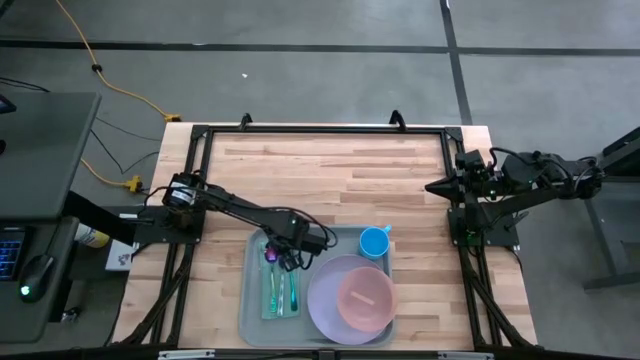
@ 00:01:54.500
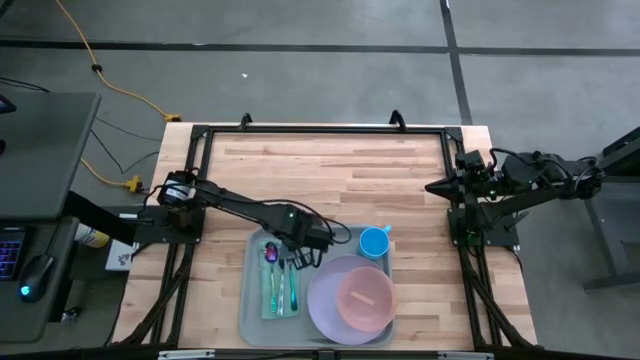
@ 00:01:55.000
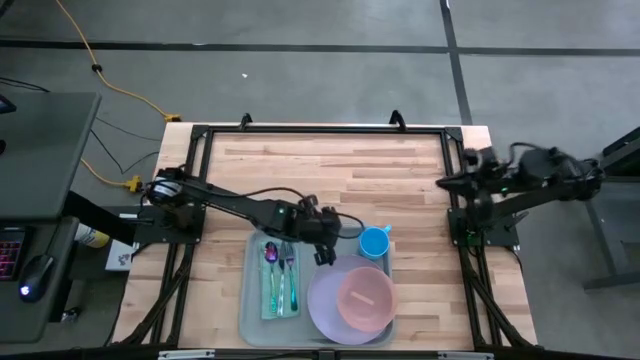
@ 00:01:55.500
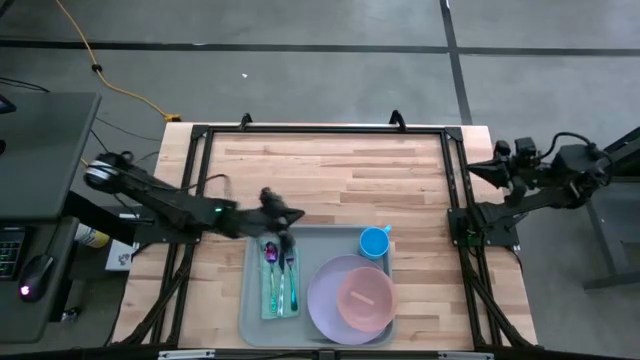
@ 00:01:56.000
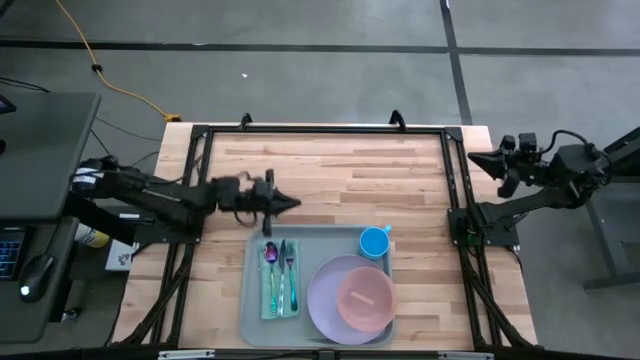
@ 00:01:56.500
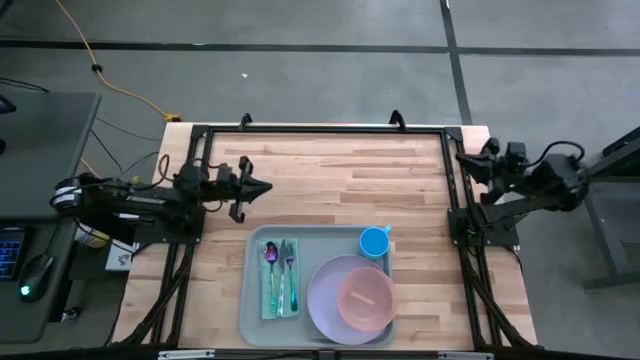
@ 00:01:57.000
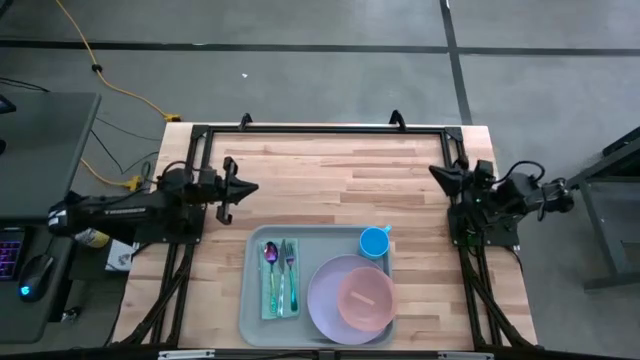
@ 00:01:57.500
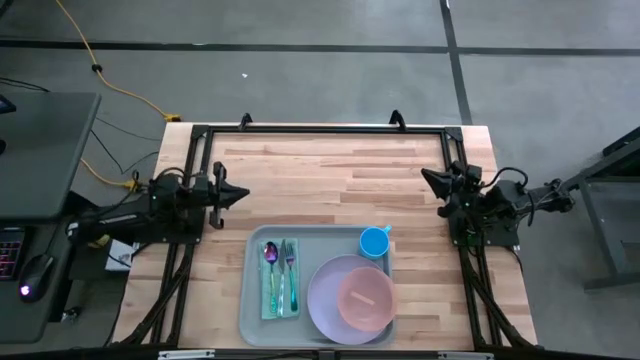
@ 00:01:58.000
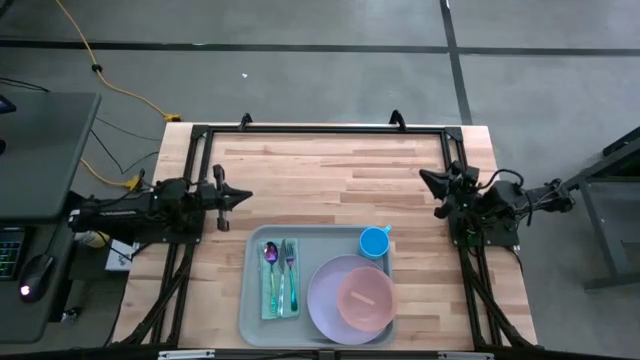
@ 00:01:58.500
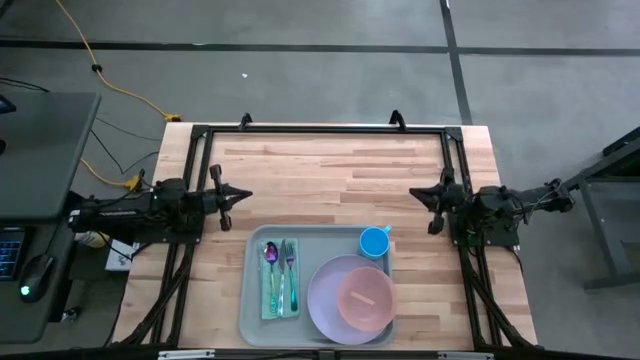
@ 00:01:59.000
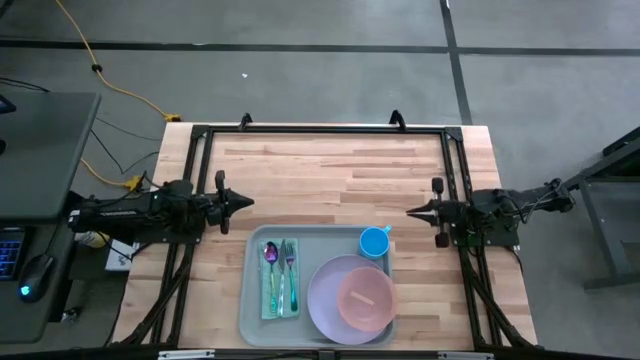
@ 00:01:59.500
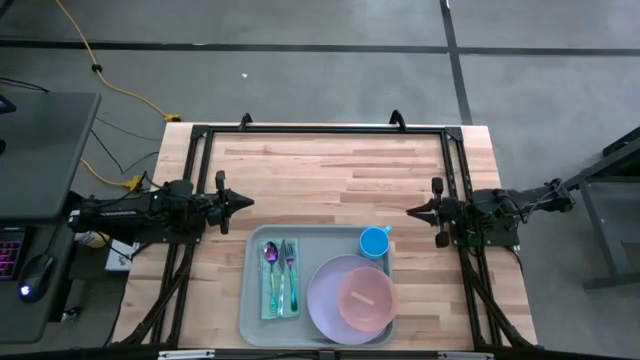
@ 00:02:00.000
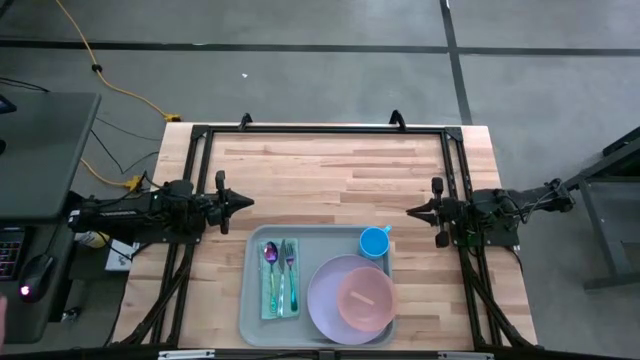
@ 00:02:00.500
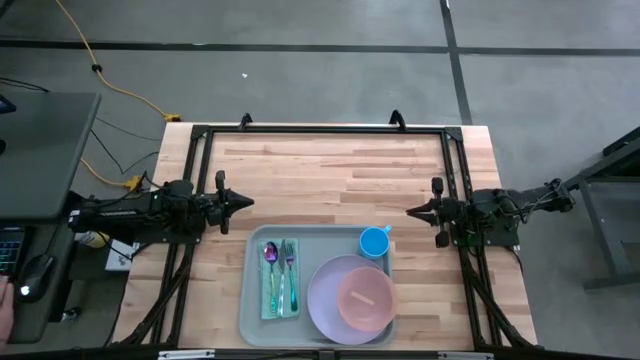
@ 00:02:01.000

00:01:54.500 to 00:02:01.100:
Task: Set up tray
Return to Home Position

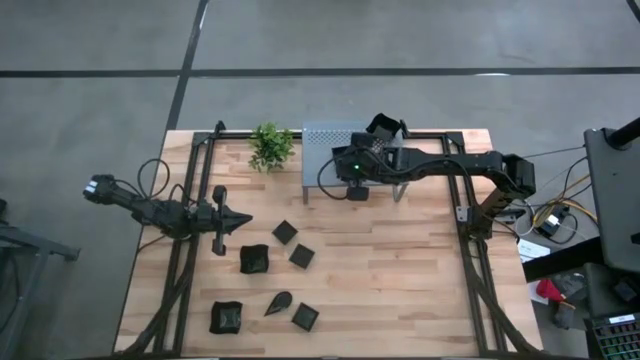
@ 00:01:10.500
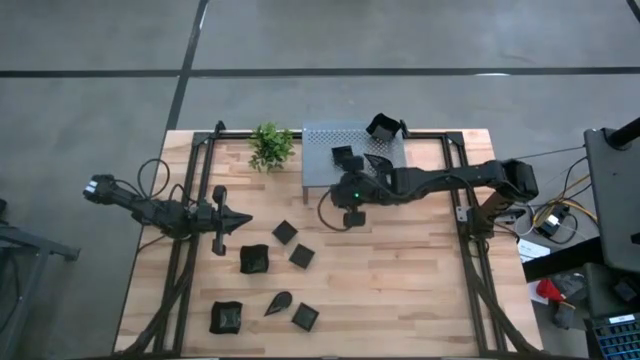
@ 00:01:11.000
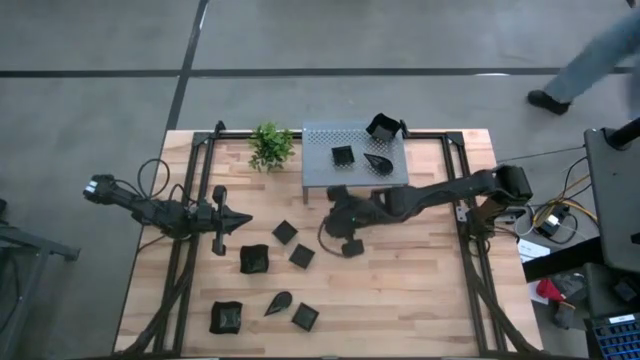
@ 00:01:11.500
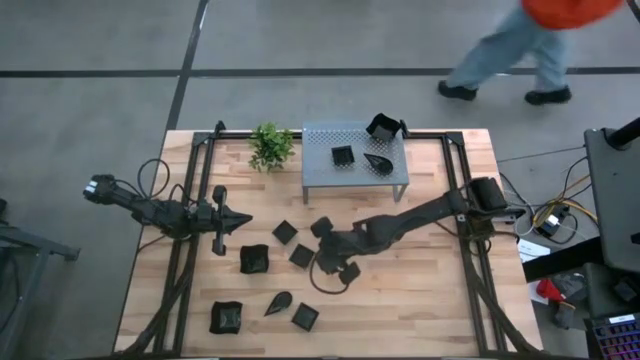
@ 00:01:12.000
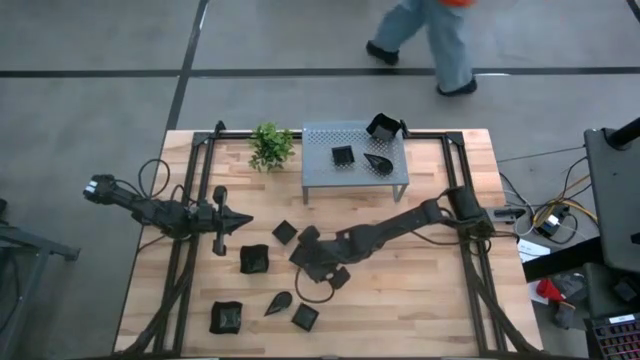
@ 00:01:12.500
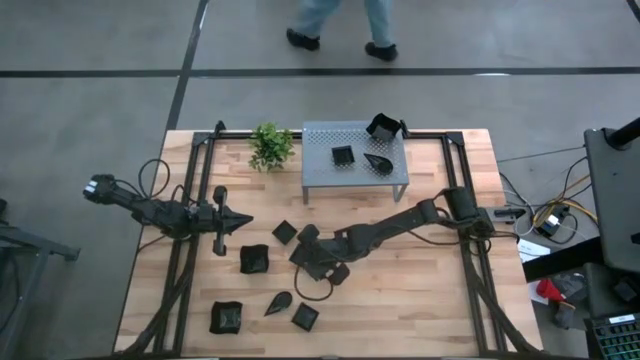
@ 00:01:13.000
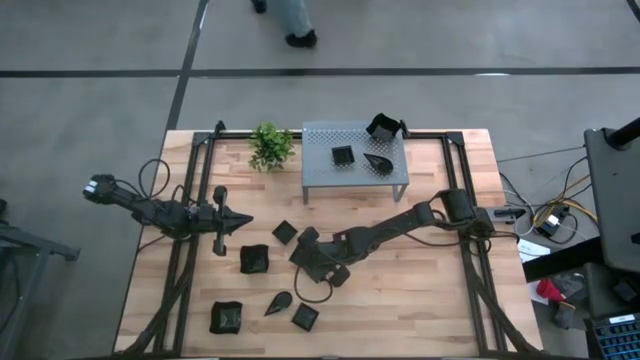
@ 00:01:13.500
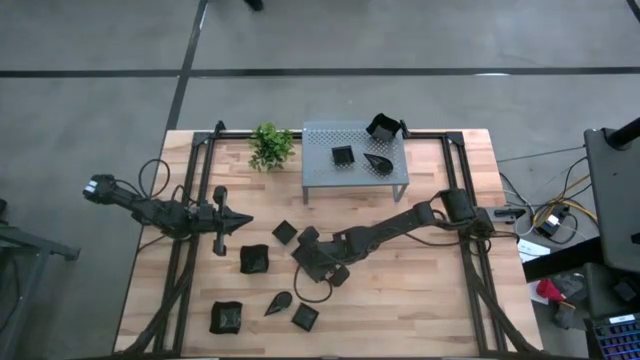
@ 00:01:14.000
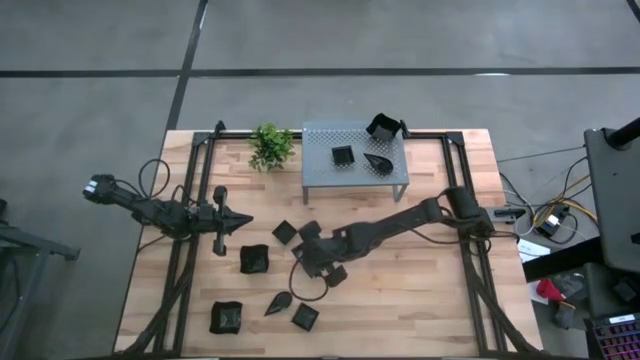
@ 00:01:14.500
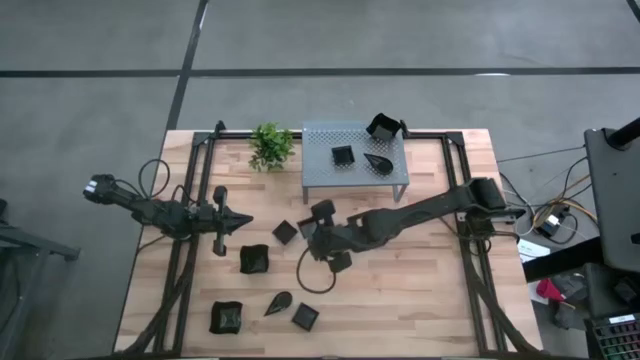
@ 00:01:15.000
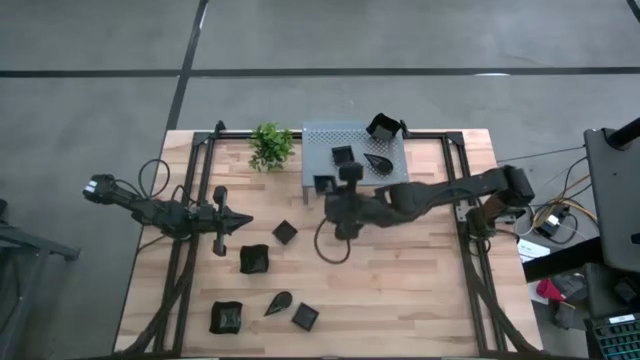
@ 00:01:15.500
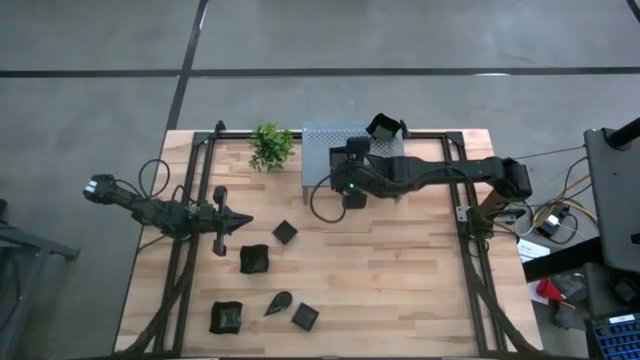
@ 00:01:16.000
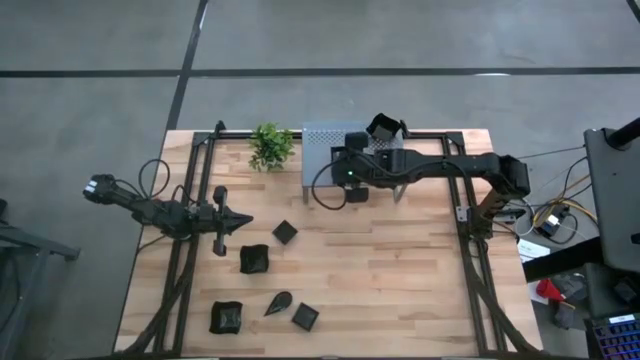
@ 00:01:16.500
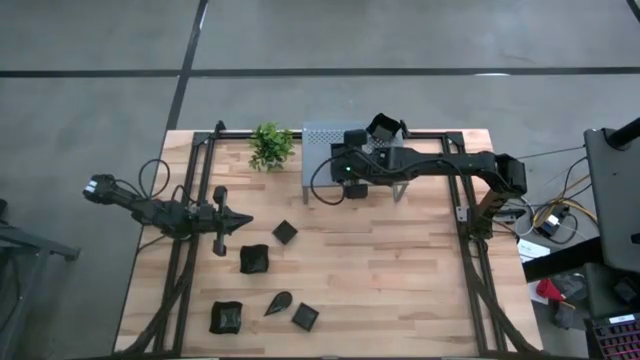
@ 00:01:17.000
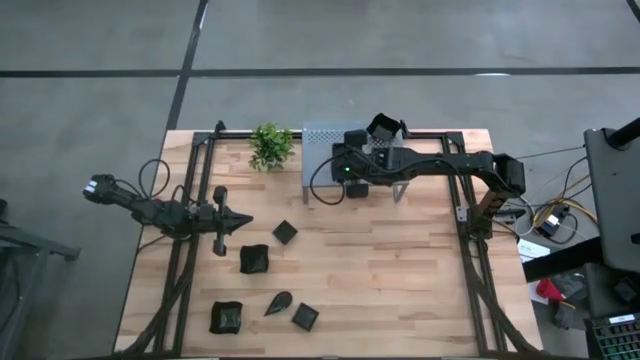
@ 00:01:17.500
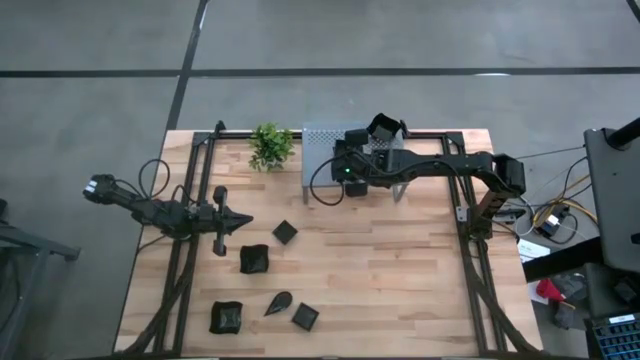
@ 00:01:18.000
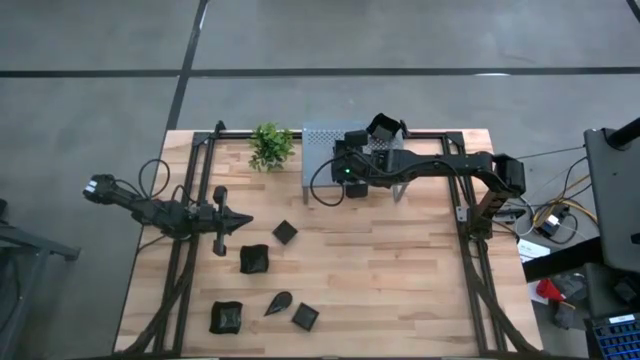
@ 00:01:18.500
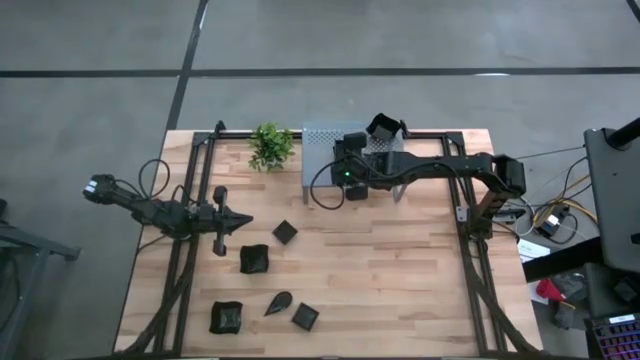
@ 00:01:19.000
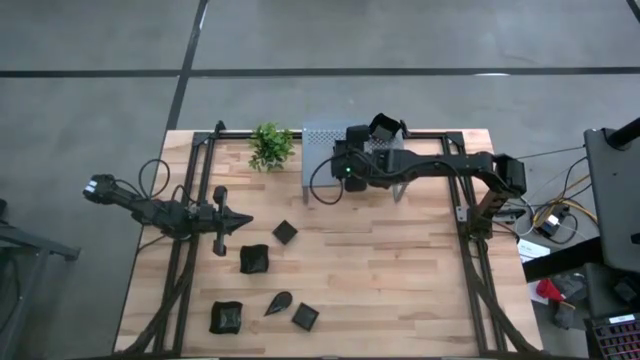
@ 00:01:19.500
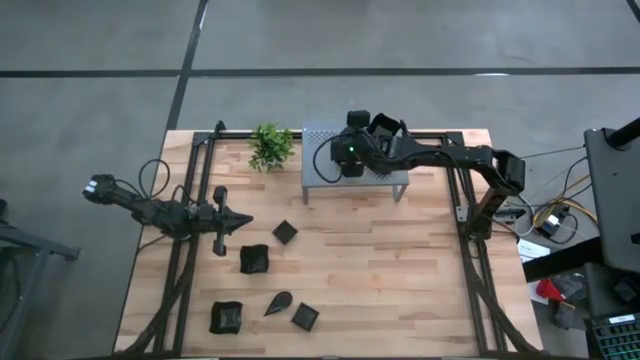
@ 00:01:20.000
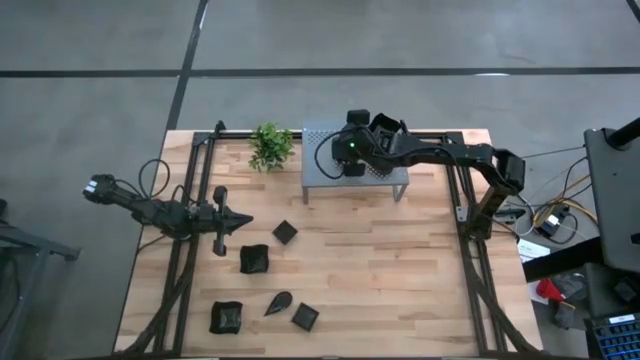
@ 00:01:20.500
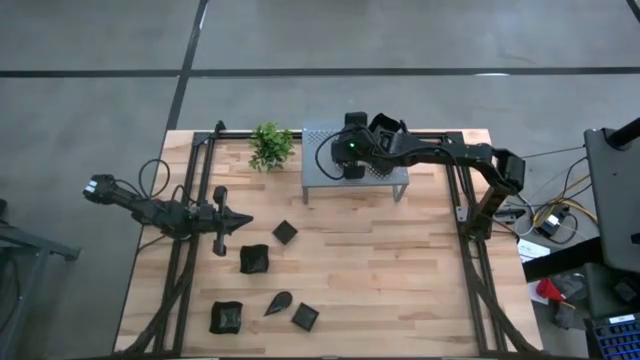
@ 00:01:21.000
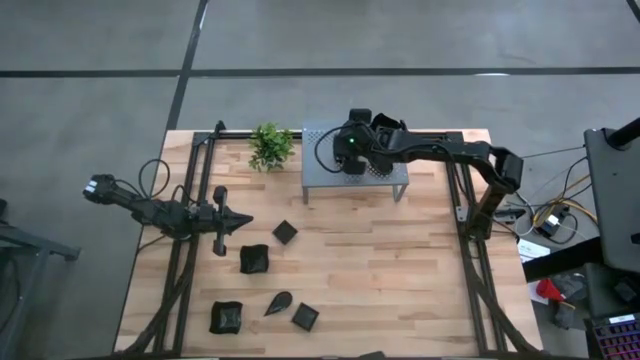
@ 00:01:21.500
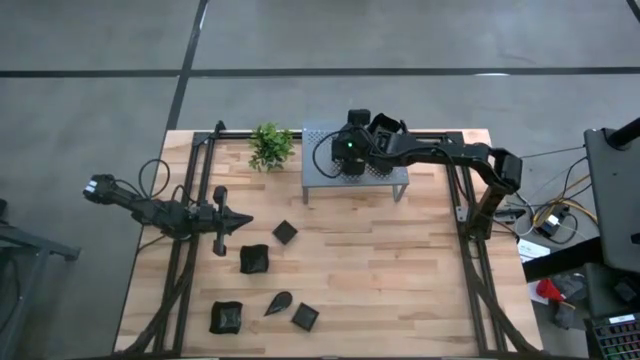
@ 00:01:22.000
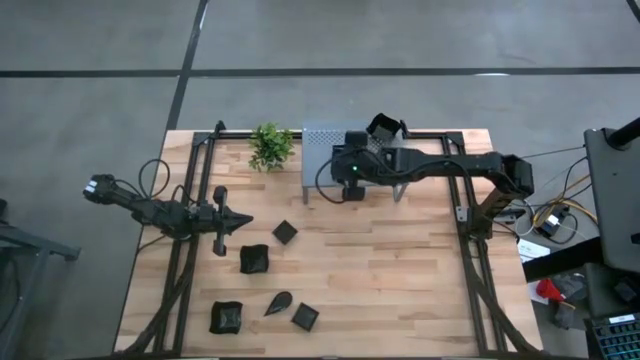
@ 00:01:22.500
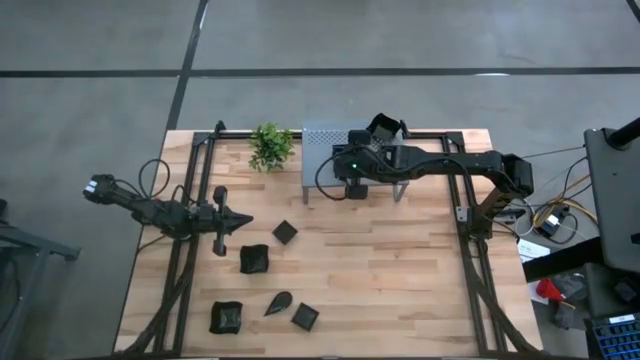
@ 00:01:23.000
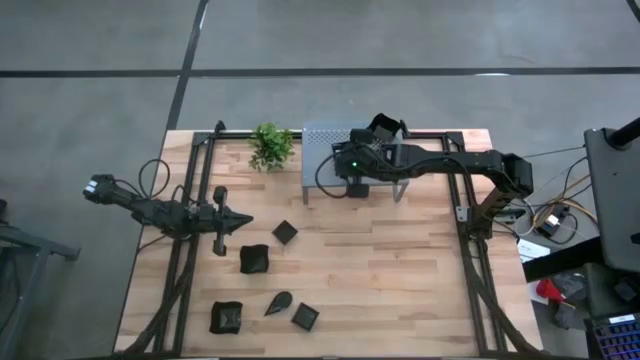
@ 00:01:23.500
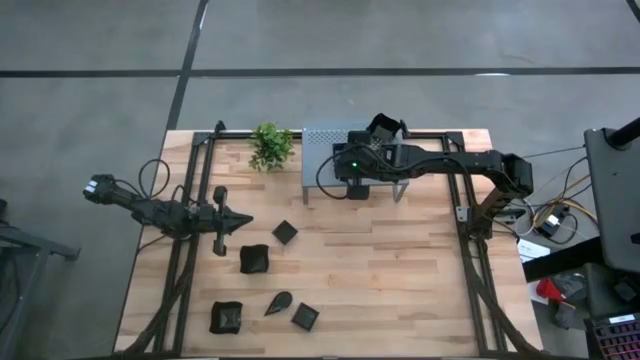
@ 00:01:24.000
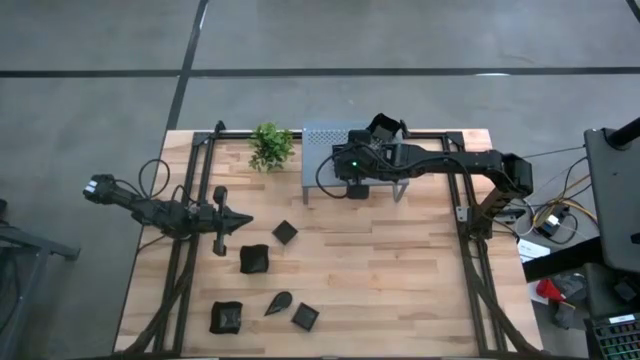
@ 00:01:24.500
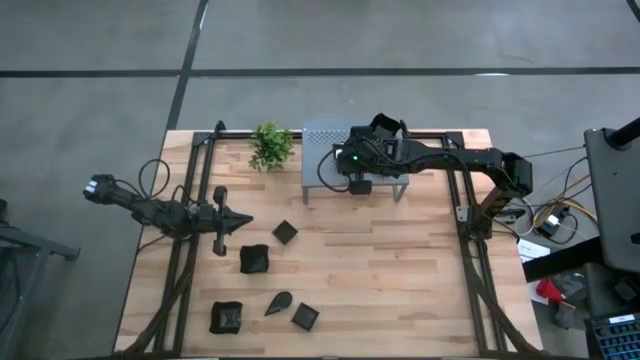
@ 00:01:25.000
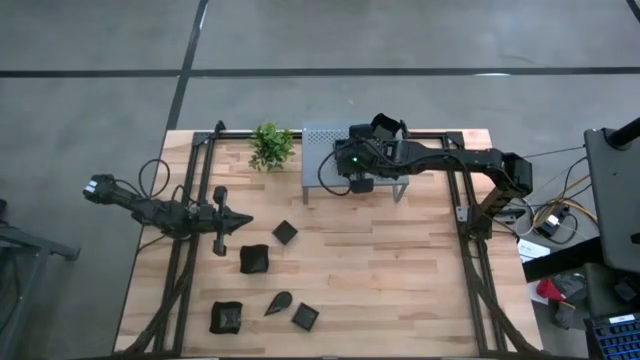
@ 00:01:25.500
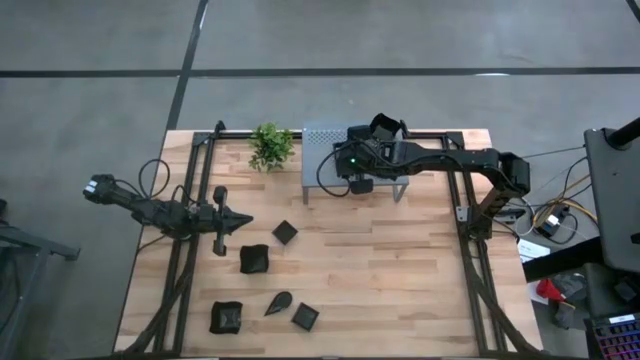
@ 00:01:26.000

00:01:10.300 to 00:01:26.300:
Task: Pick & Place Mini shaped plates
Stack the square plate on top of the other square plate on the shelf
